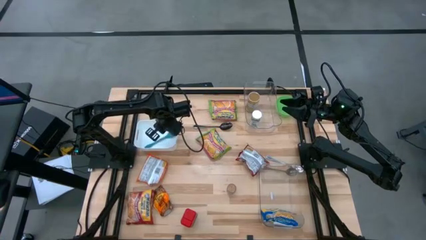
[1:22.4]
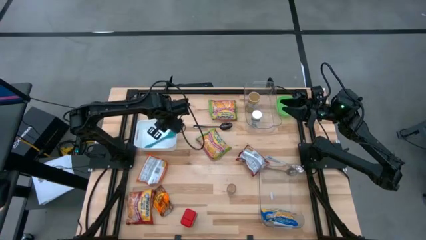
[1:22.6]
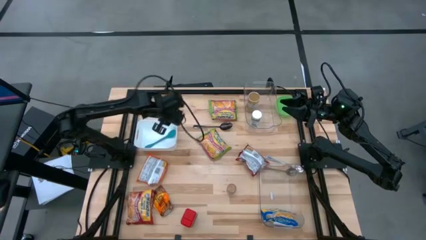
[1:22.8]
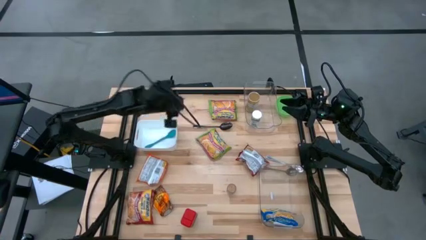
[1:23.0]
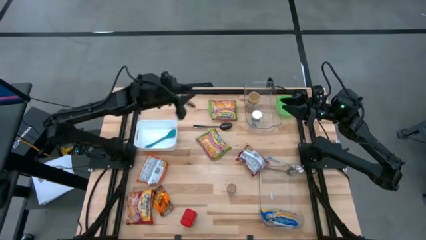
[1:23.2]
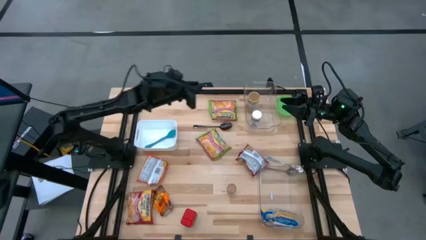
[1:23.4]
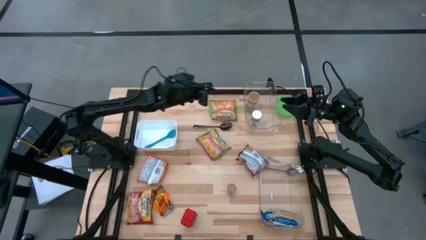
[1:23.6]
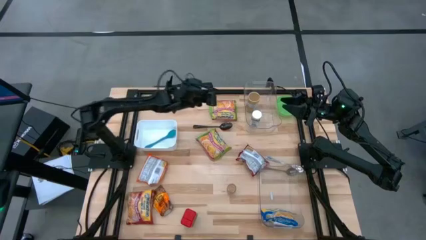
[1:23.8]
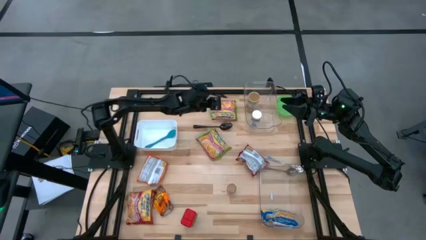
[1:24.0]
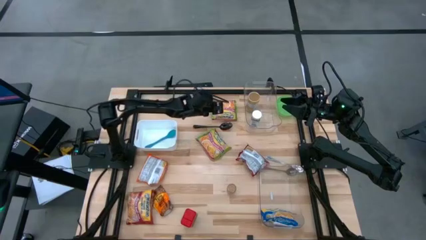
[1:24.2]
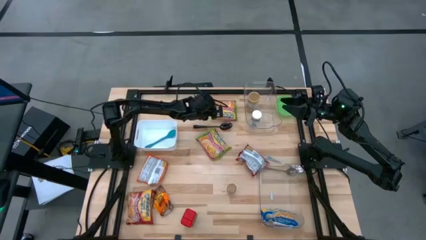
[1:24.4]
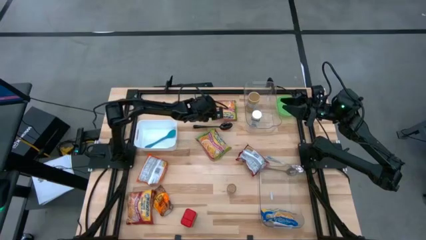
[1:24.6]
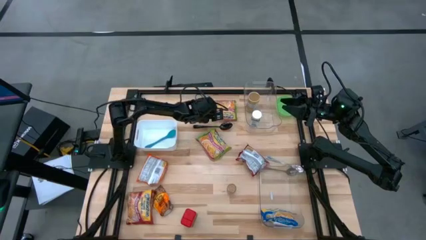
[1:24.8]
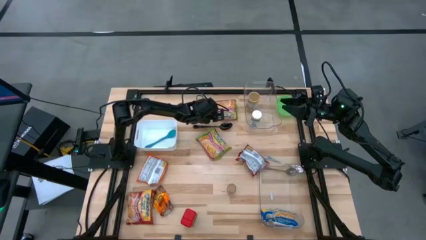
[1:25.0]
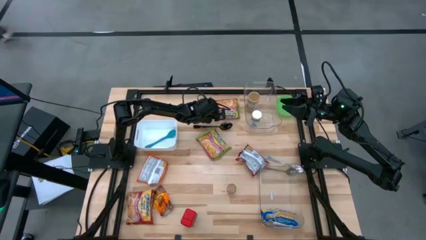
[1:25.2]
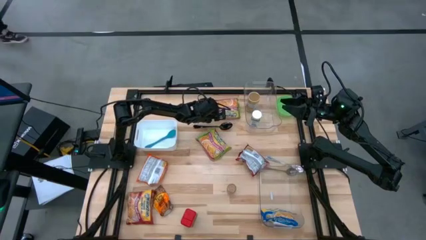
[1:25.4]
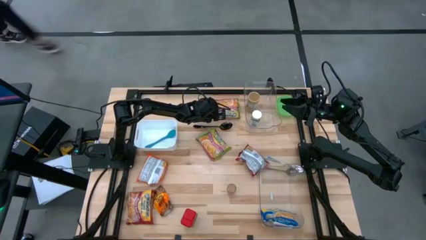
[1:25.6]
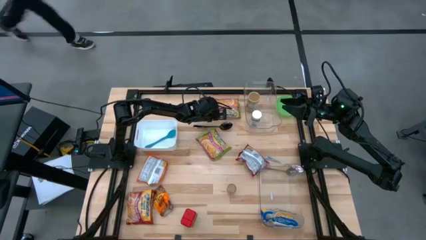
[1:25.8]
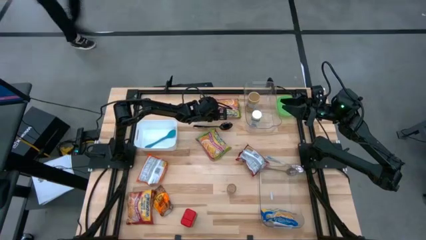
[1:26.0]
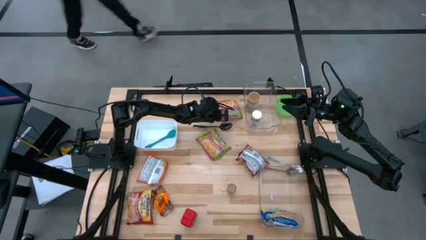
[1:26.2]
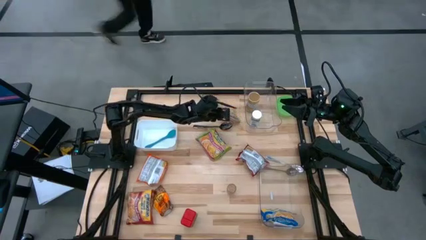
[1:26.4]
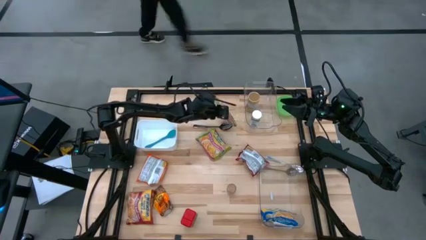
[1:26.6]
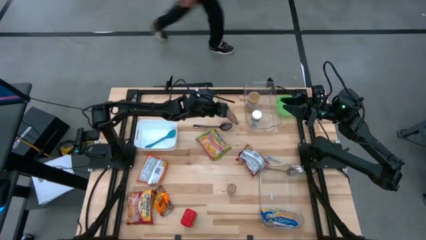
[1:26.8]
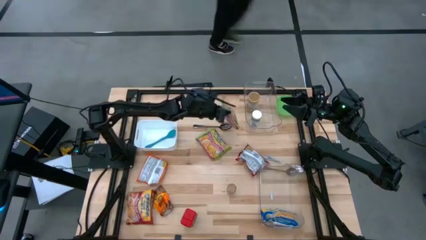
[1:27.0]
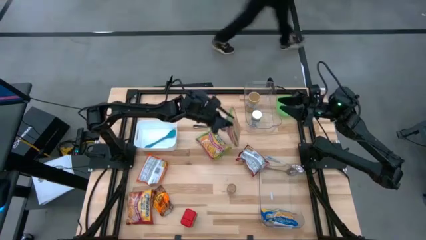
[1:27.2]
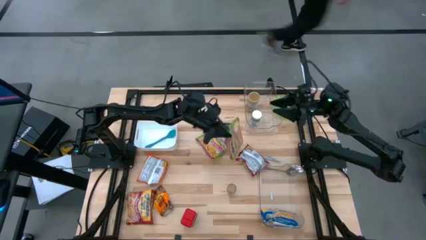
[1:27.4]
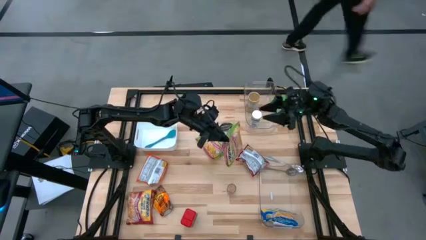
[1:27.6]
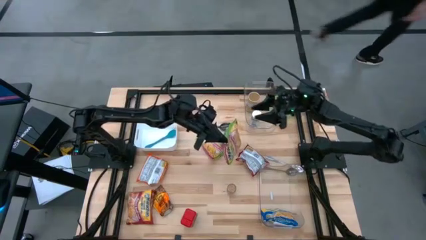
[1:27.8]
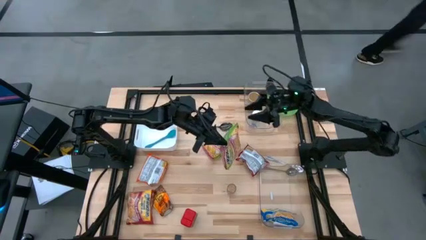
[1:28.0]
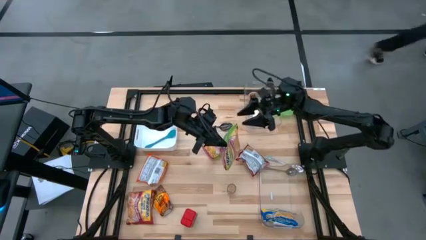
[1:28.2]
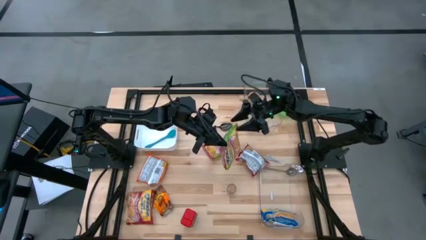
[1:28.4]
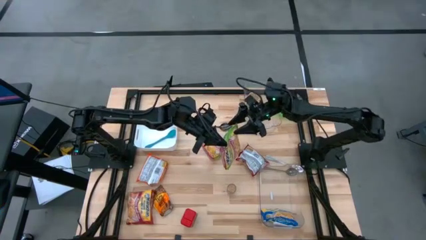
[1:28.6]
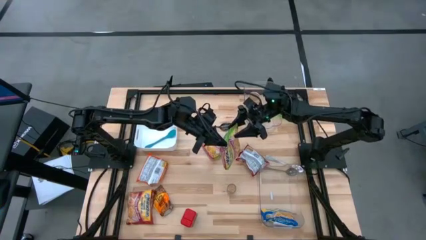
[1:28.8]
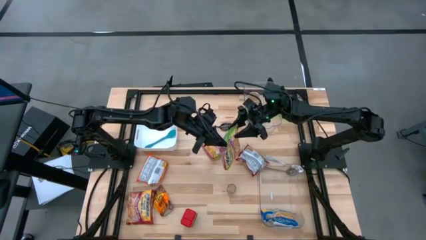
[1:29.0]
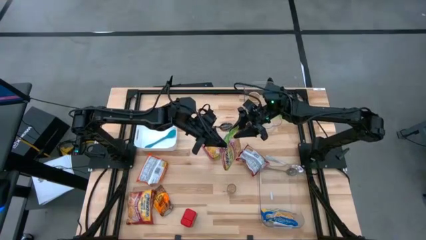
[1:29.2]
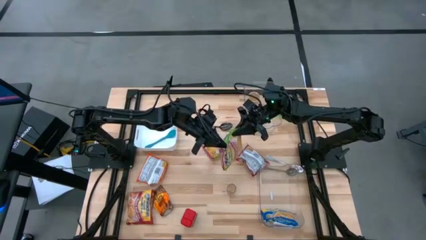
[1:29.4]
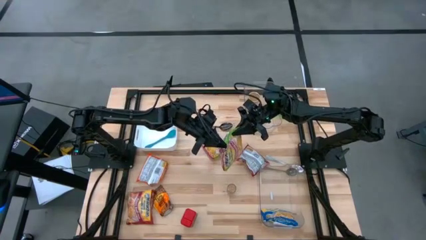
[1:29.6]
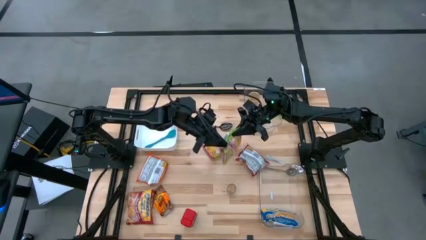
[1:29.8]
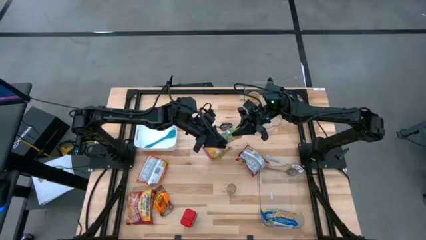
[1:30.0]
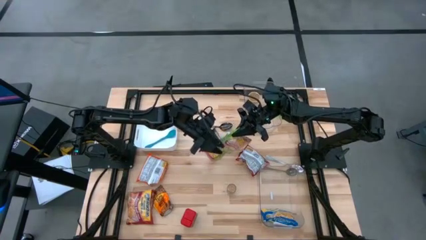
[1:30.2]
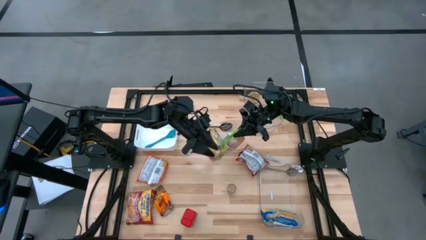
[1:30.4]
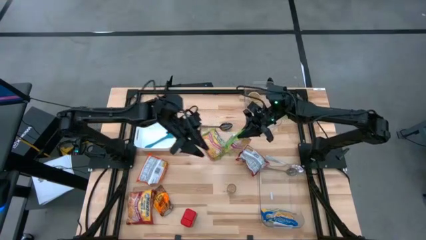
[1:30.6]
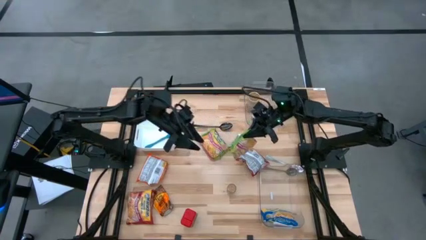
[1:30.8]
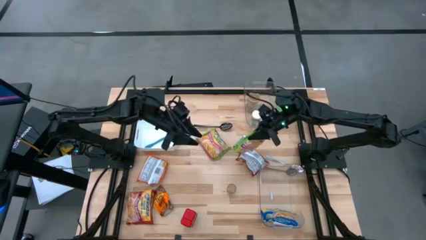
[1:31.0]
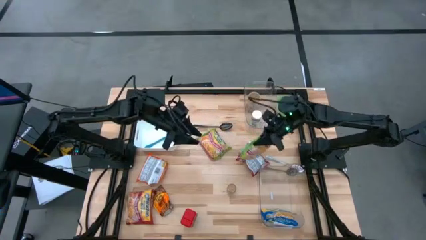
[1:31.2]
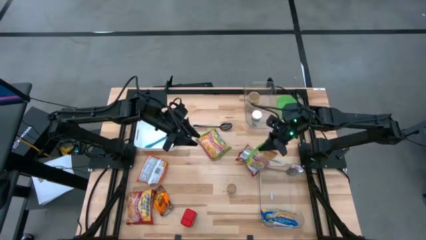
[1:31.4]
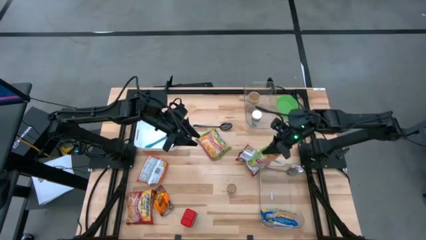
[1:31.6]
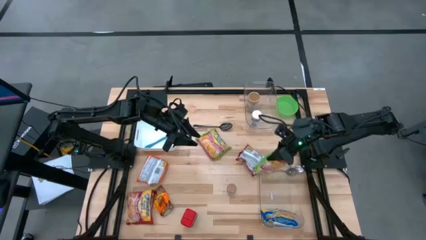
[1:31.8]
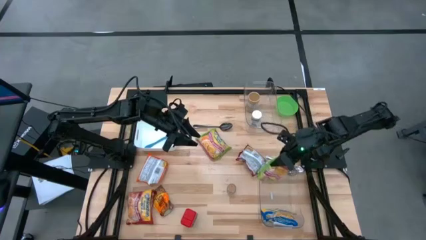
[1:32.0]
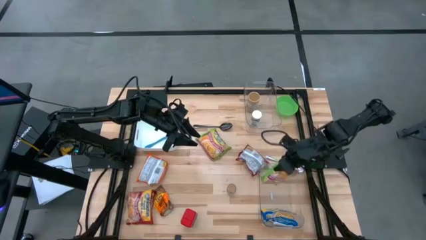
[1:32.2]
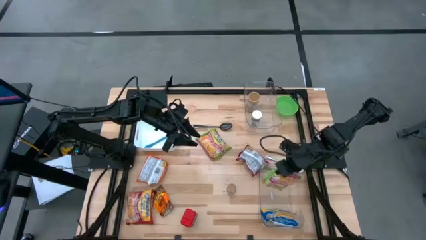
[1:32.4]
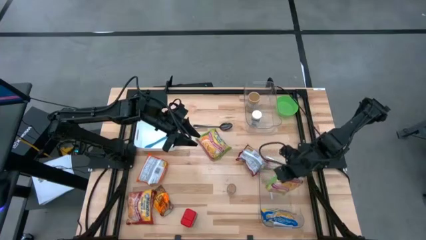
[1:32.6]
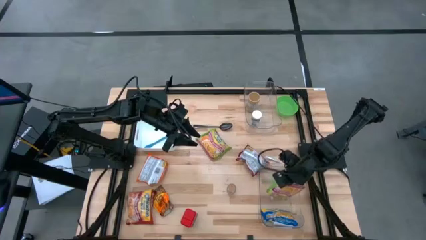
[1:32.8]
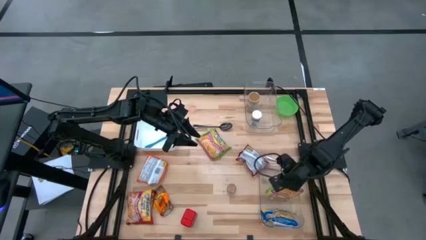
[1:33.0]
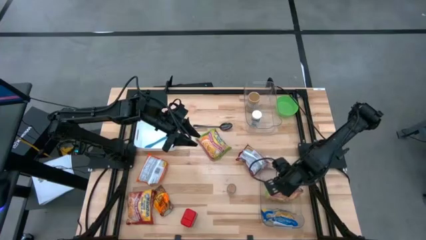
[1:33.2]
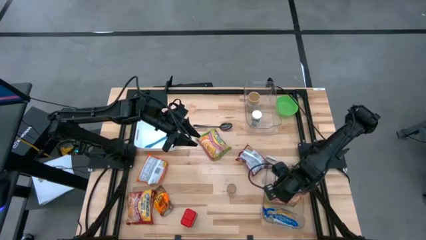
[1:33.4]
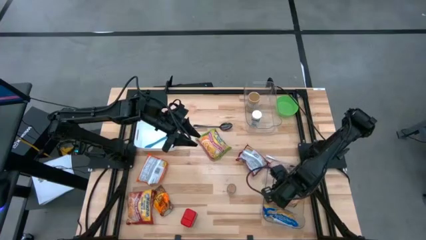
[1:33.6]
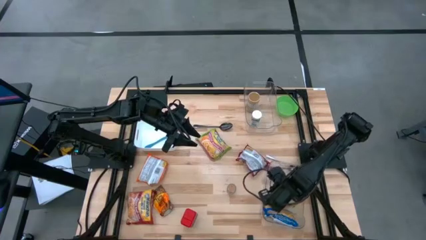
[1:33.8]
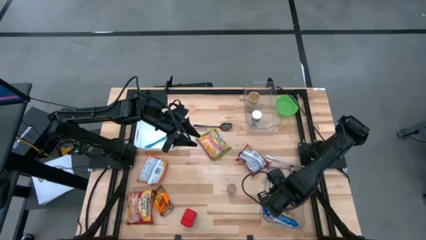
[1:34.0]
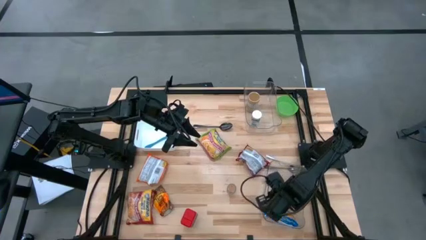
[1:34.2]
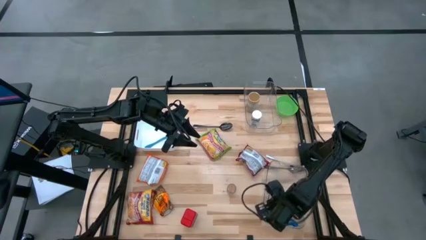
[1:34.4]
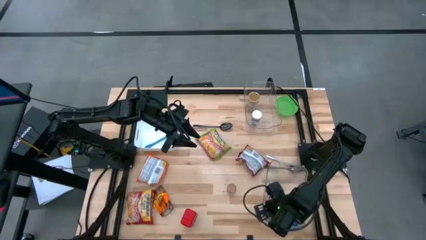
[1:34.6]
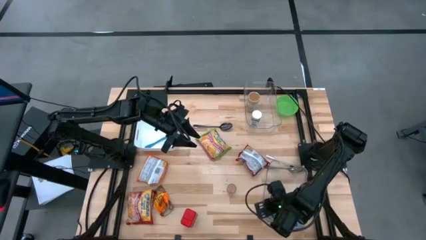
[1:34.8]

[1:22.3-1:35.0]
Task: Pick & Place Food Item
Put the top green noodle pack into the bottom transparent bin

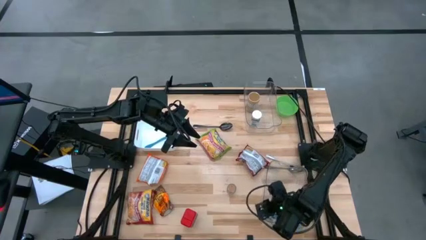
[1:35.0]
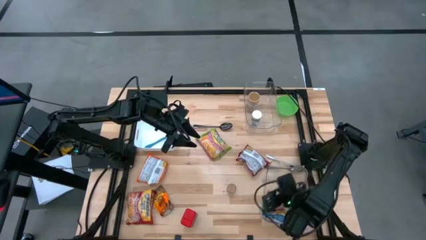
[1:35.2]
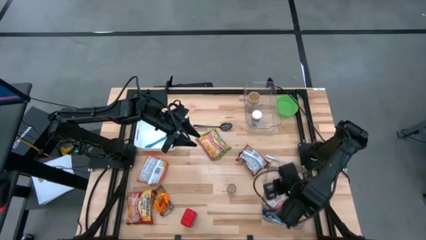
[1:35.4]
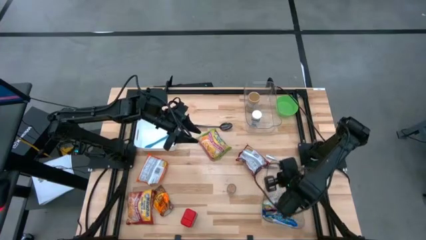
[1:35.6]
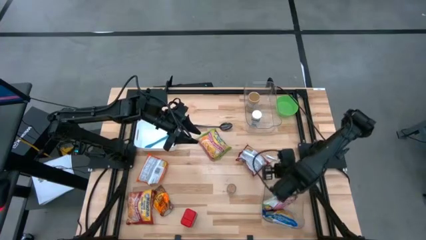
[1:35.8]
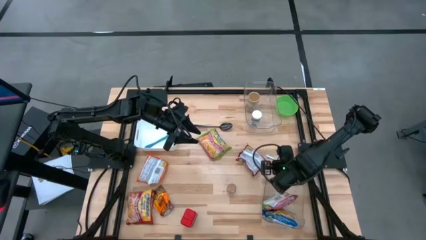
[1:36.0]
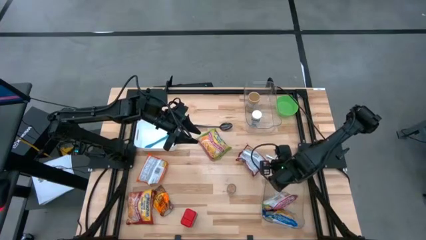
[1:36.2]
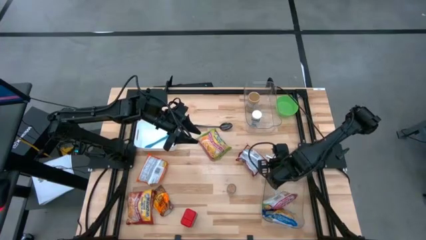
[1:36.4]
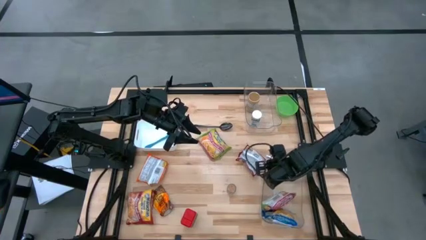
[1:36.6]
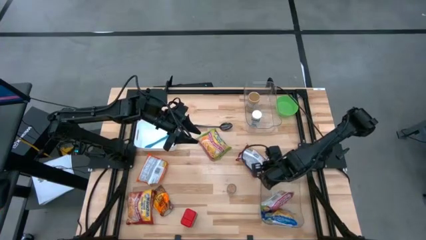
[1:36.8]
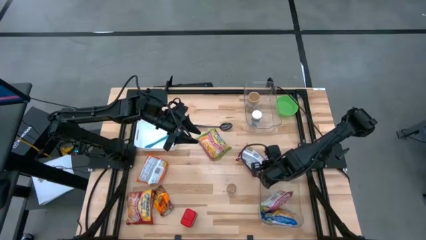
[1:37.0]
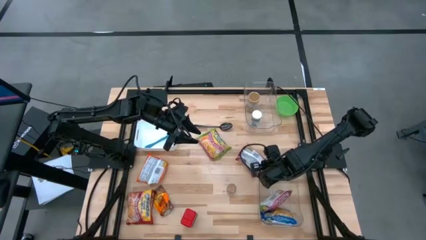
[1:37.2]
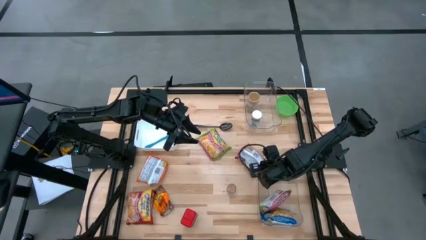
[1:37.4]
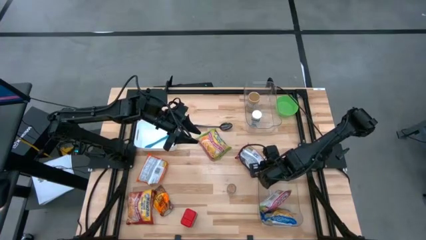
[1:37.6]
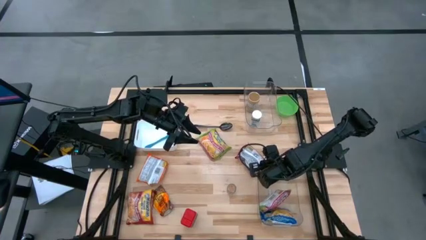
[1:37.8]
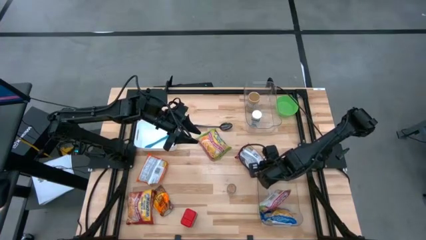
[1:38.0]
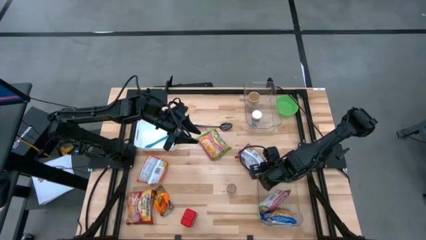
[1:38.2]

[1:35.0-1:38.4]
Adjust the bottom transparent bin
